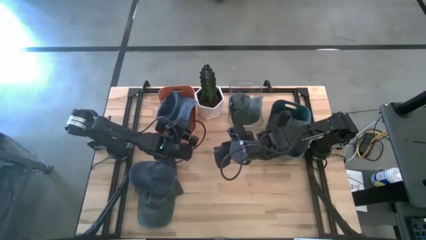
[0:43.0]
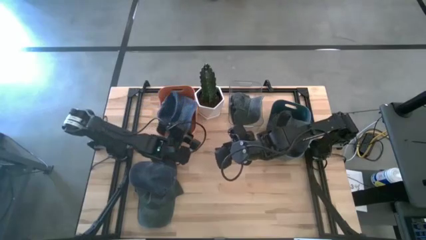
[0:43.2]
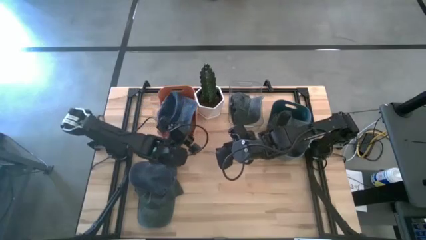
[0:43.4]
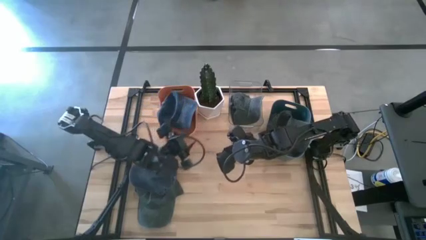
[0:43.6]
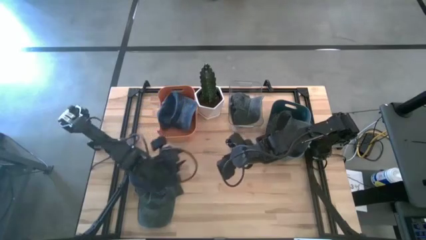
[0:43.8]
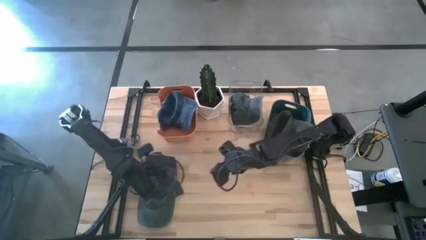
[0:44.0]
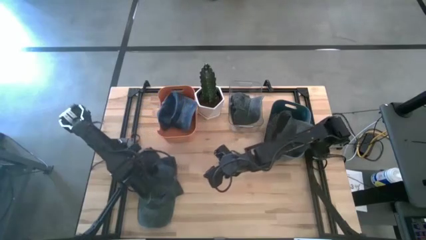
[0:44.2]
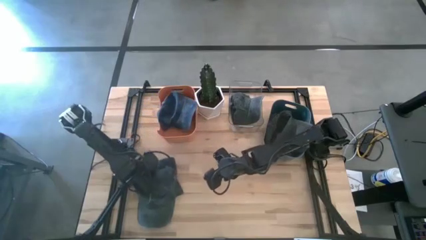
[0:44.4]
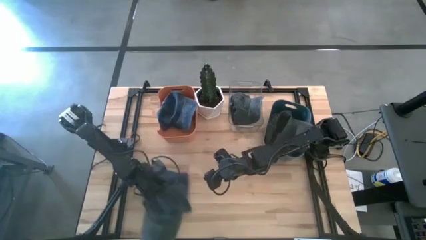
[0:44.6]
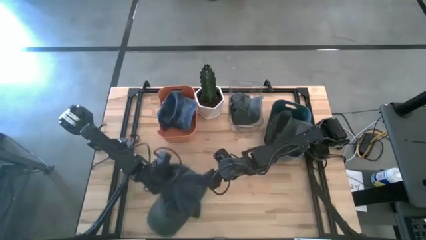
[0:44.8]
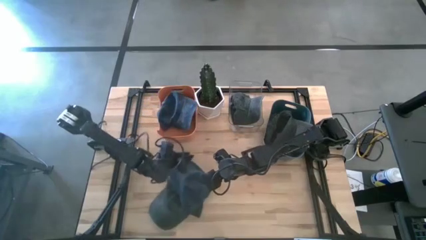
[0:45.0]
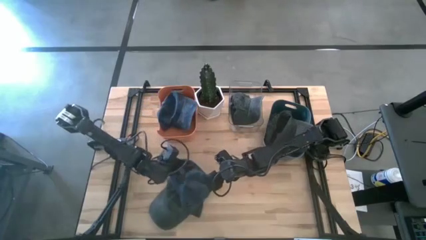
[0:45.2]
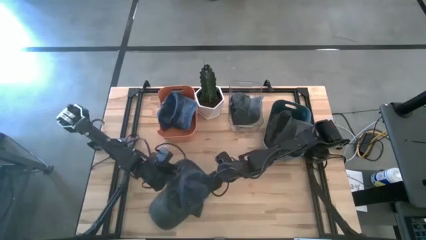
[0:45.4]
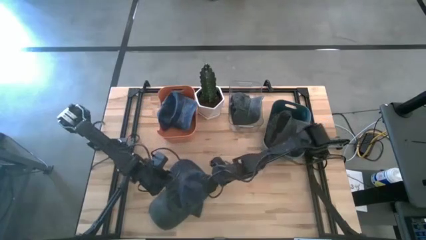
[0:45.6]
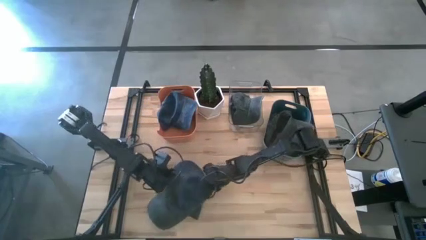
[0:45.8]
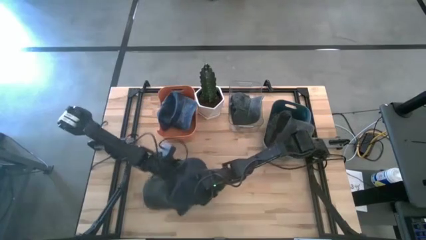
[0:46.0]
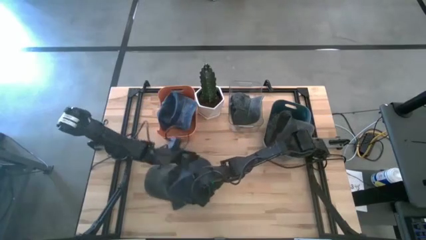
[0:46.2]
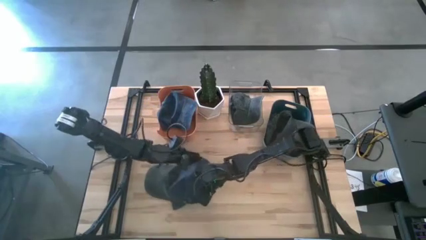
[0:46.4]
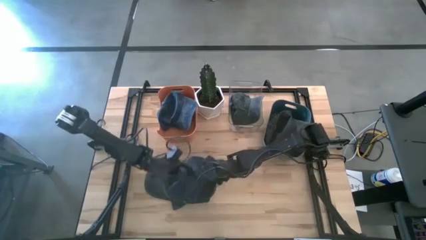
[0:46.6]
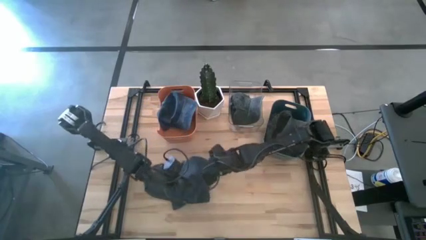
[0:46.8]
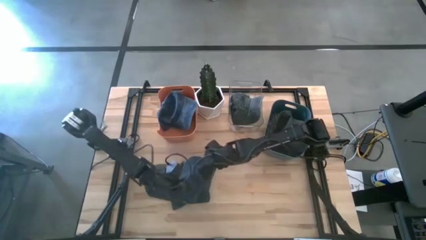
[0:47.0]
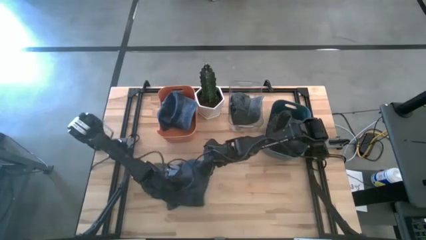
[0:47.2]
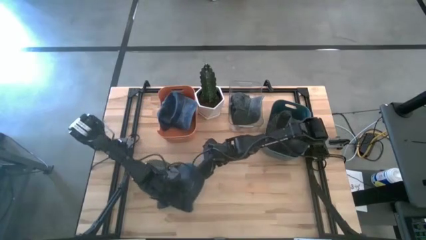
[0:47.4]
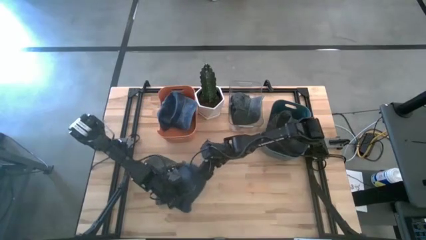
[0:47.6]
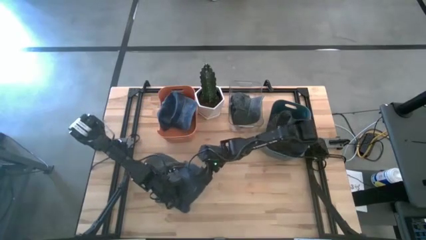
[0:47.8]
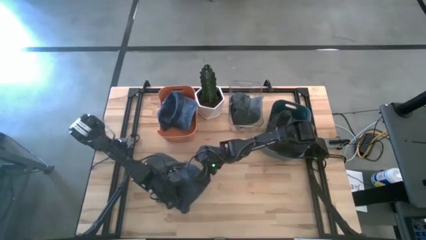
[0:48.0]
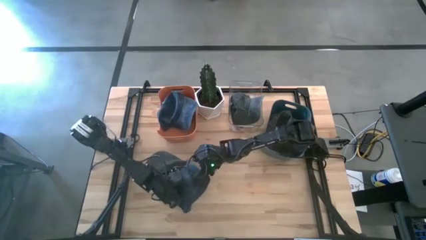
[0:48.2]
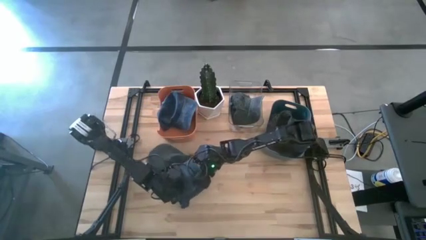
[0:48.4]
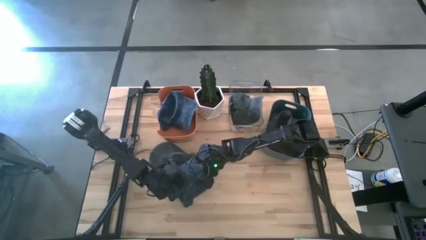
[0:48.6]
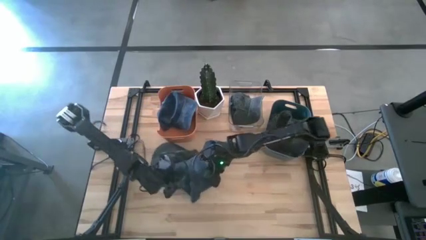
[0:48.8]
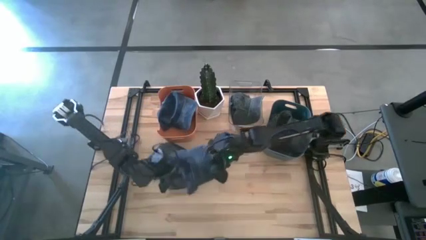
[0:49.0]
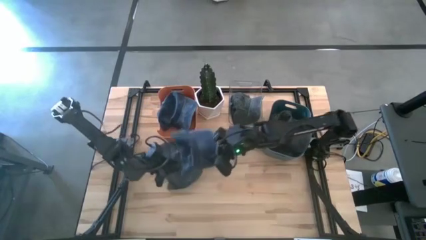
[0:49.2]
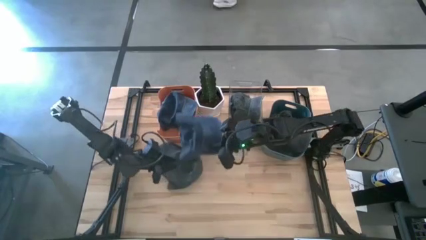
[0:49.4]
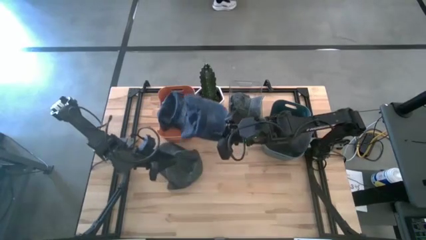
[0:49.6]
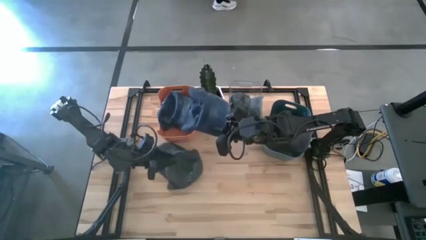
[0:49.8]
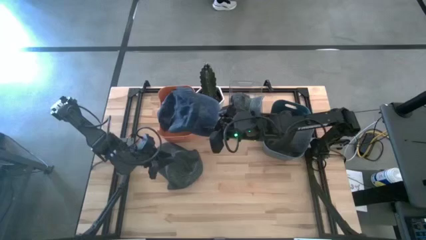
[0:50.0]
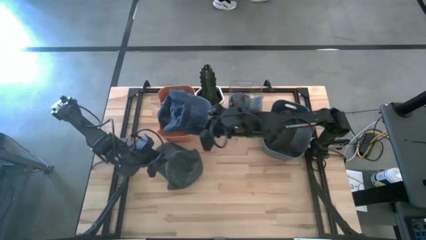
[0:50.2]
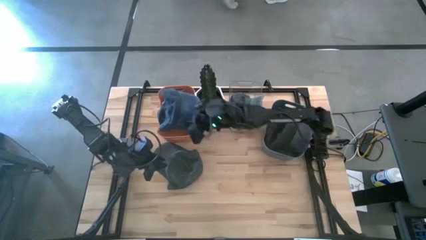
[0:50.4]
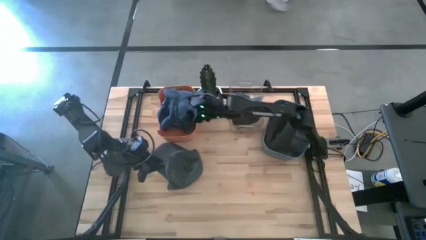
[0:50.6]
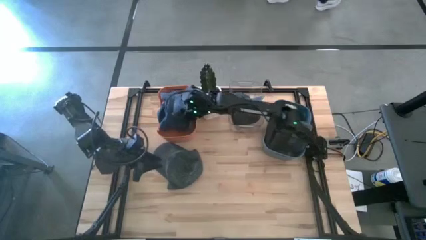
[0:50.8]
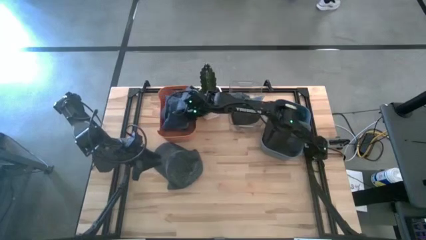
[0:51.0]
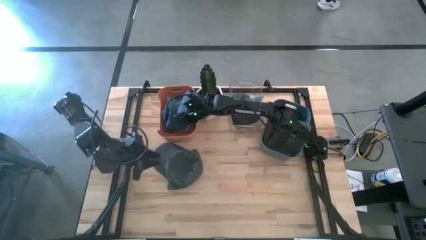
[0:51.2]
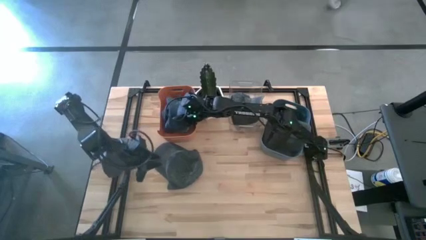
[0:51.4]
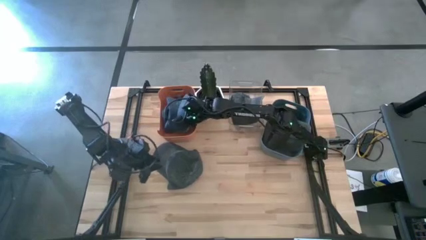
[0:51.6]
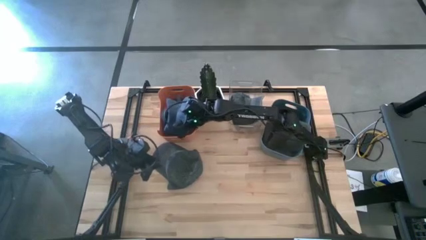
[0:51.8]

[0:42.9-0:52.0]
Task: Pick & Place hat
Put the dark blue cap into the orange bin

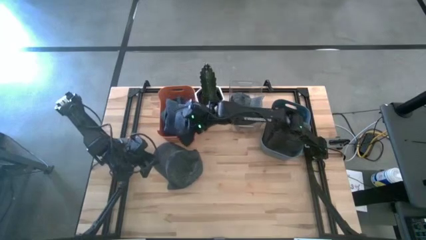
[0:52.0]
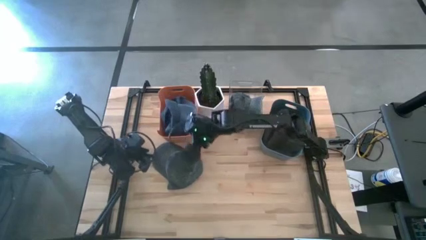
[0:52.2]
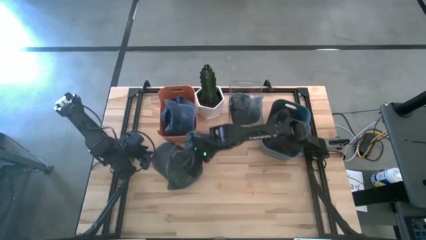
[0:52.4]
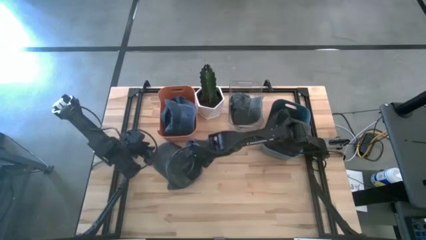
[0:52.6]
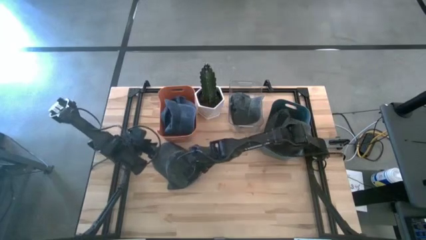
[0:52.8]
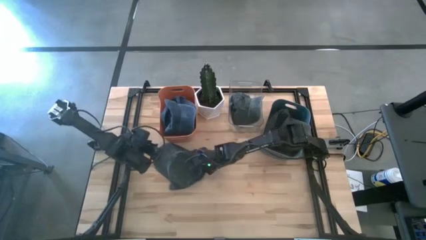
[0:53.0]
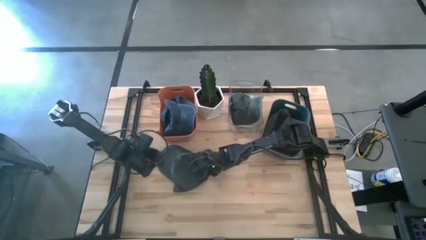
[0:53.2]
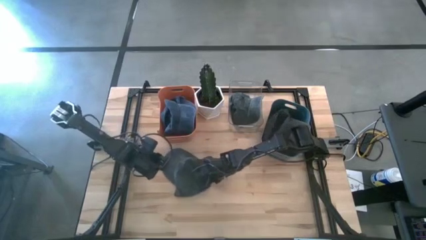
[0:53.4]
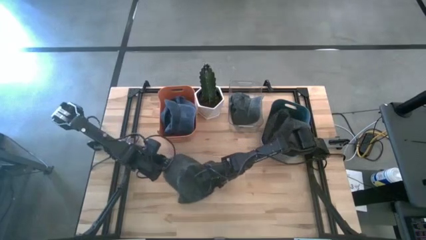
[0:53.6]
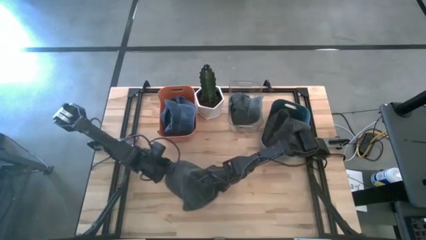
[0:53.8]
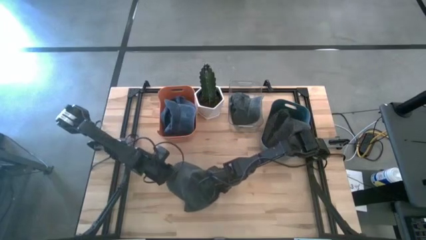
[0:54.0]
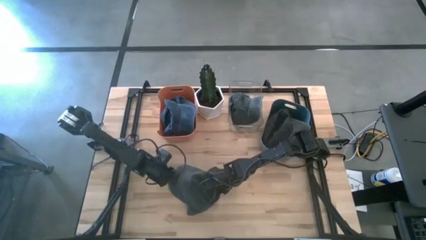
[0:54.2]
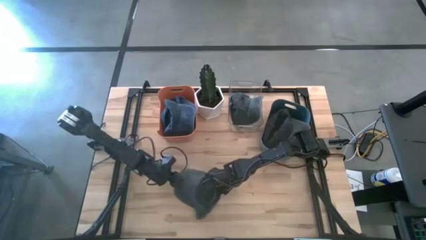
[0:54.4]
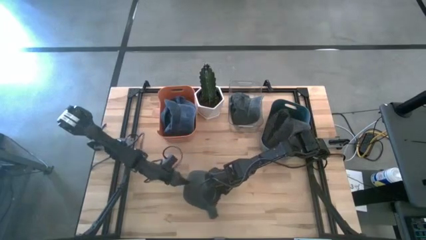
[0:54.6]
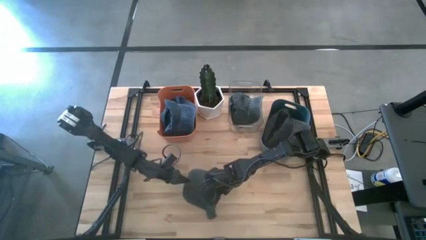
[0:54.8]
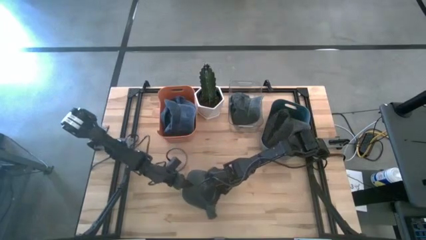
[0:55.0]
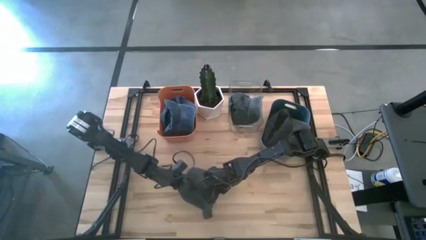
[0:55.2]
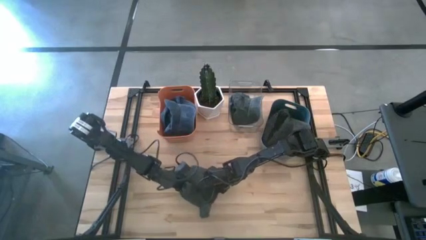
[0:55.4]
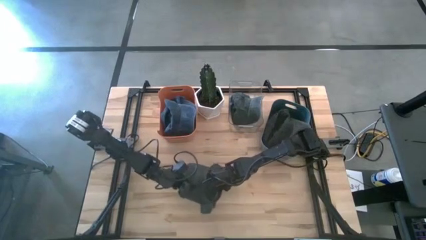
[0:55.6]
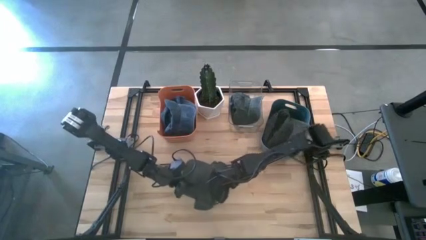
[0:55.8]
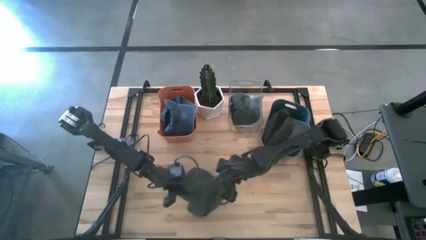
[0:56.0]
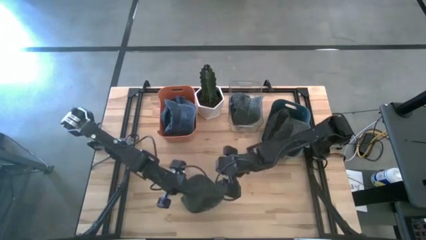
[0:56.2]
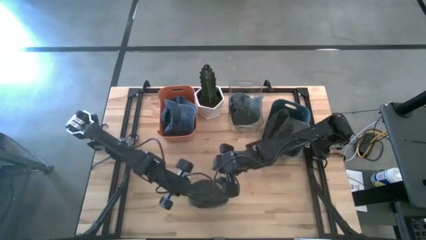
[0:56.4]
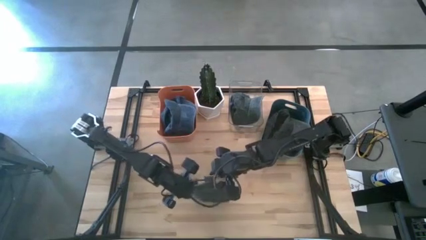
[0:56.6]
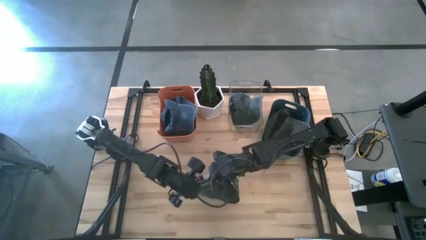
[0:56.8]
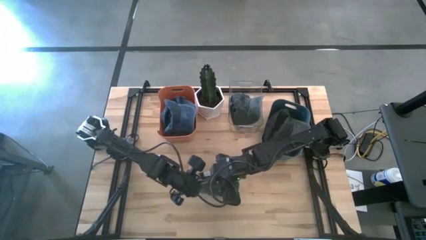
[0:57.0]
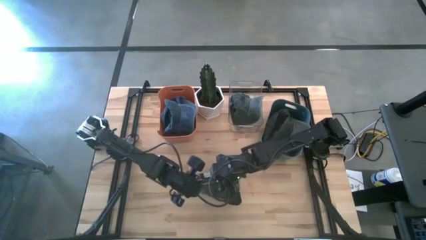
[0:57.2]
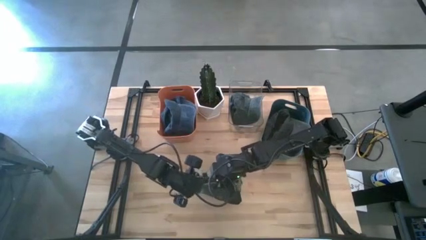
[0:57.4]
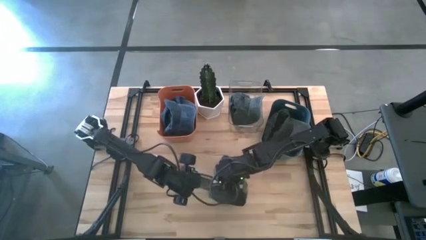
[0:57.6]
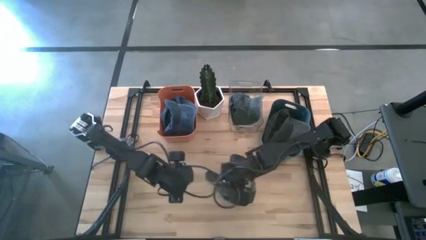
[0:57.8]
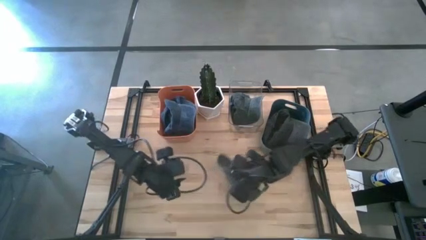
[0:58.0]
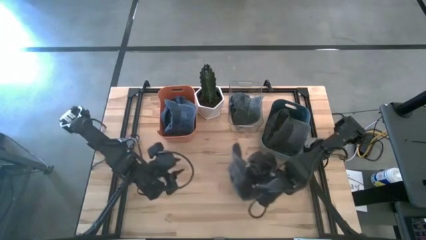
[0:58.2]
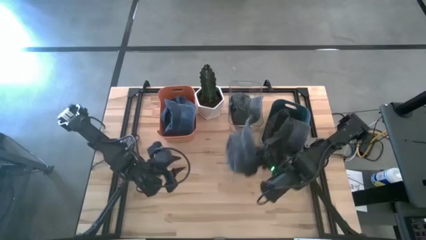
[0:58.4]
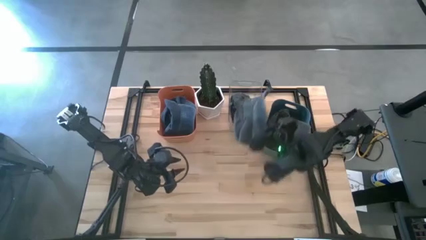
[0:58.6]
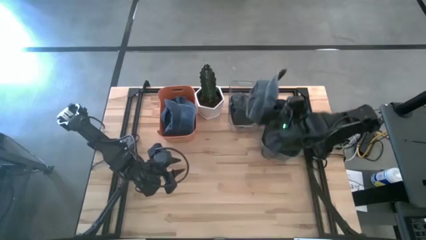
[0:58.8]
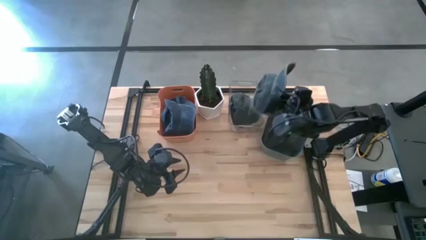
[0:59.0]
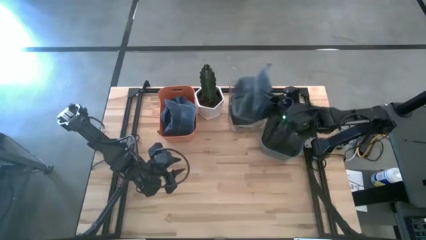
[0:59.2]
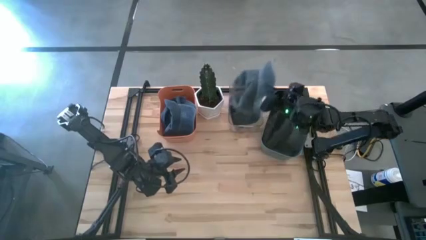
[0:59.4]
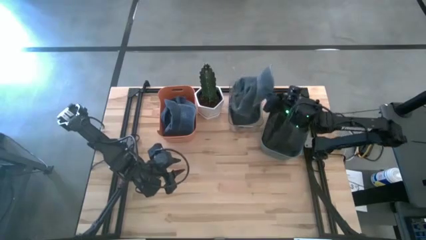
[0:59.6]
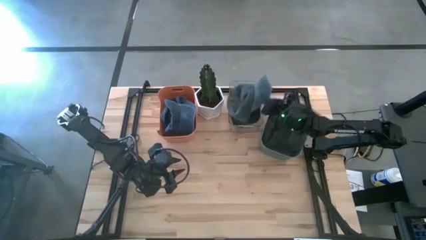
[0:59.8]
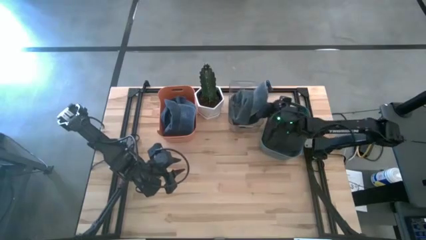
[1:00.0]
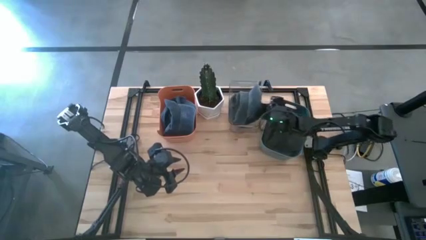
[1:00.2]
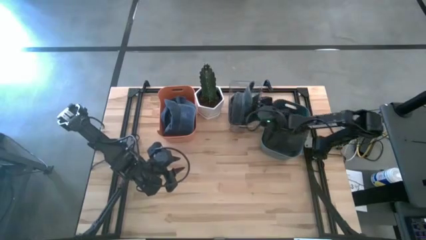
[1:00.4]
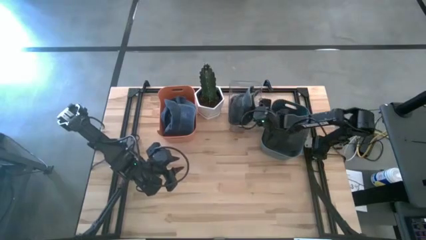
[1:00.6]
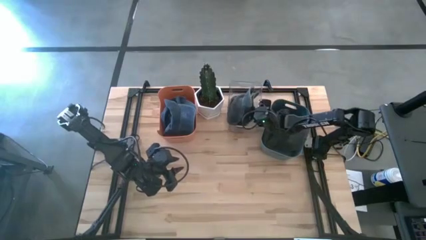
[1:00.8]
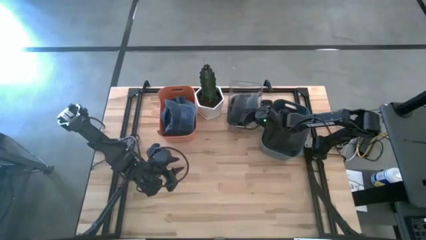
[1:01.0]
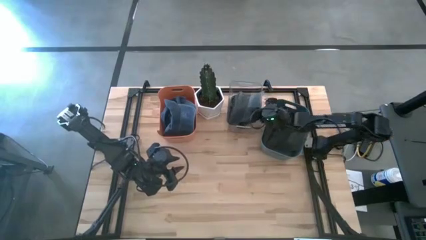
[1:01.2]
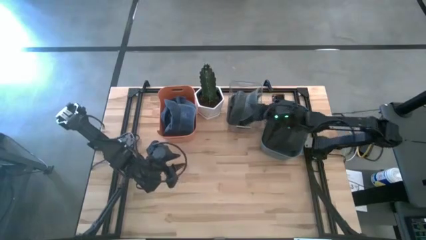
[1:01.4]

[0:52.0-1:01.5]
Put the gray cap into the transparent bin
